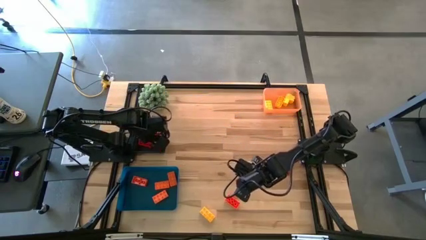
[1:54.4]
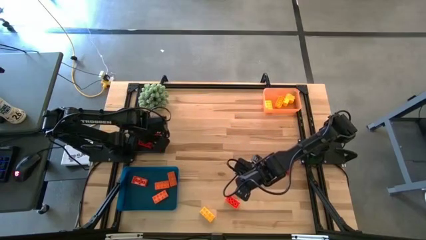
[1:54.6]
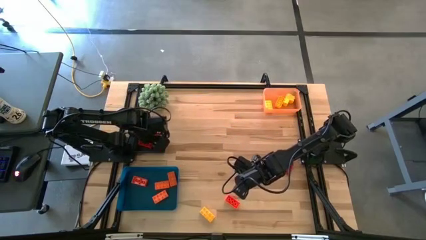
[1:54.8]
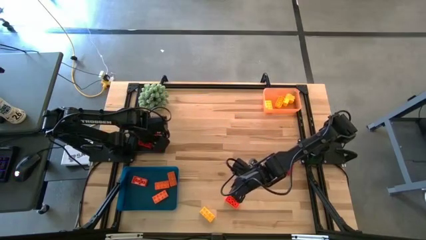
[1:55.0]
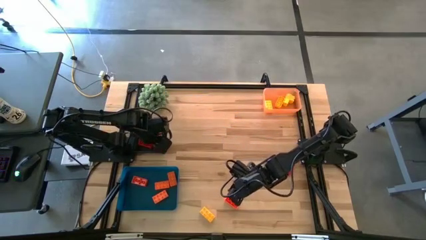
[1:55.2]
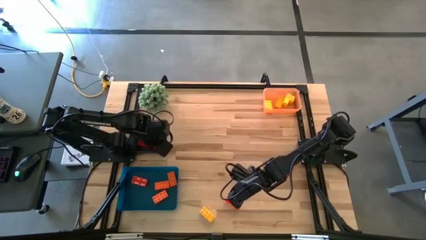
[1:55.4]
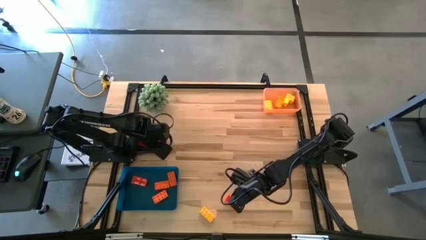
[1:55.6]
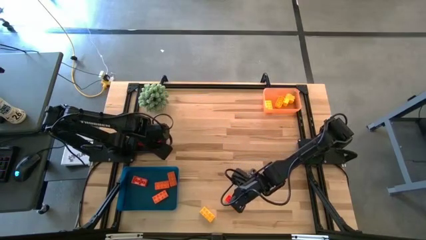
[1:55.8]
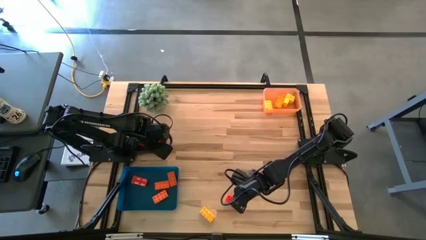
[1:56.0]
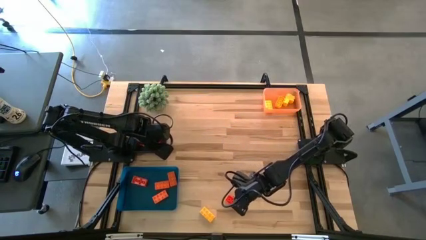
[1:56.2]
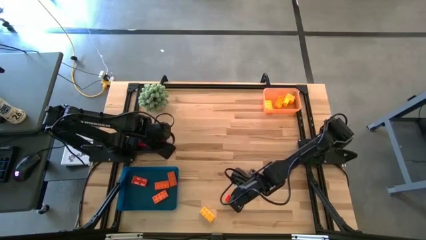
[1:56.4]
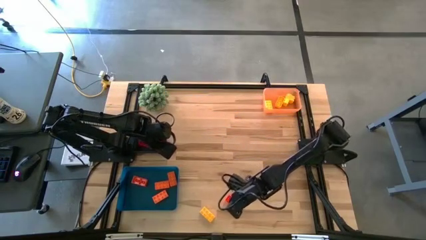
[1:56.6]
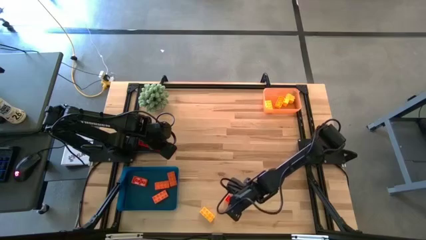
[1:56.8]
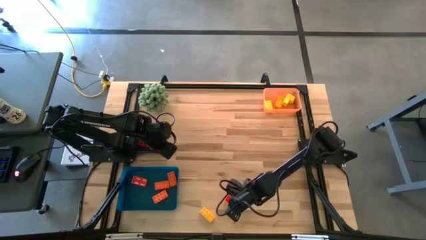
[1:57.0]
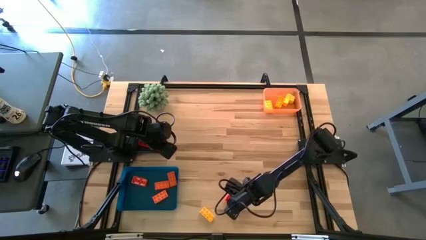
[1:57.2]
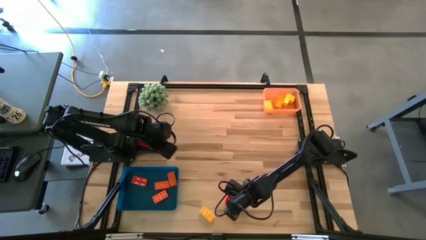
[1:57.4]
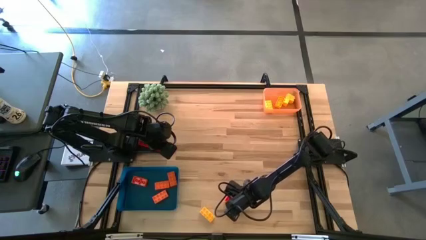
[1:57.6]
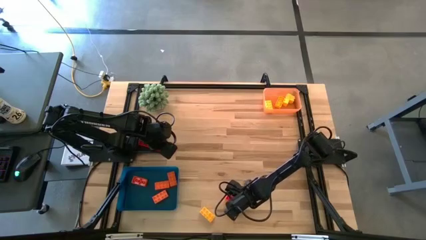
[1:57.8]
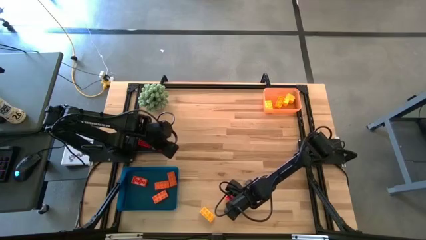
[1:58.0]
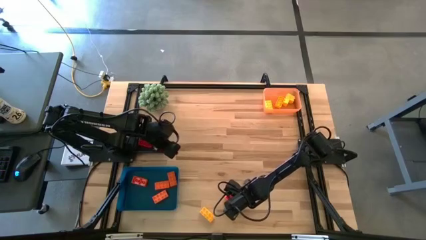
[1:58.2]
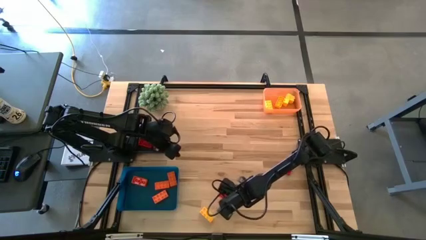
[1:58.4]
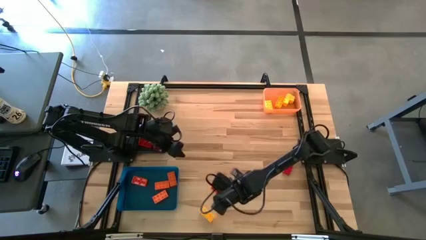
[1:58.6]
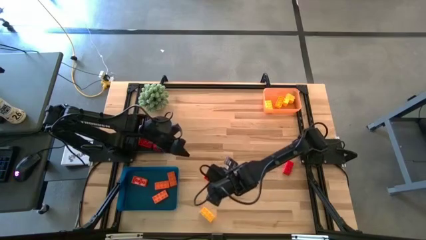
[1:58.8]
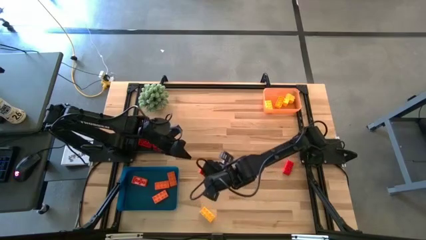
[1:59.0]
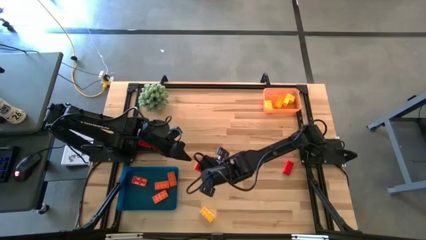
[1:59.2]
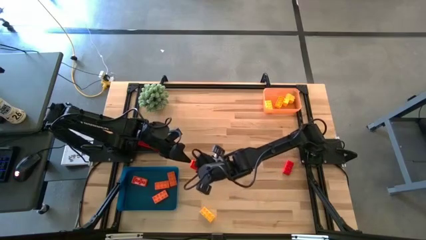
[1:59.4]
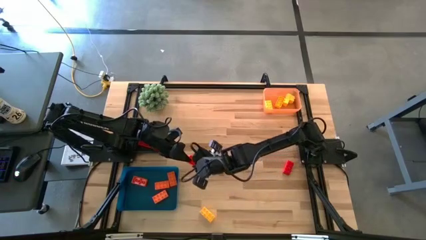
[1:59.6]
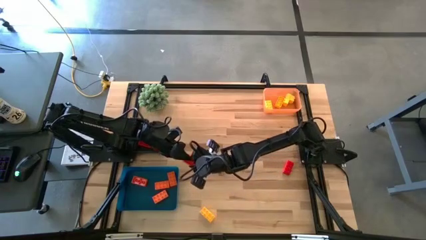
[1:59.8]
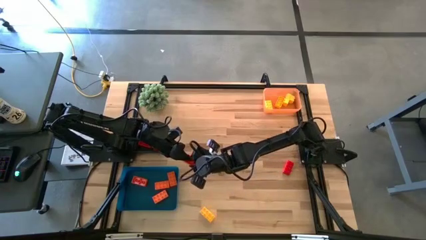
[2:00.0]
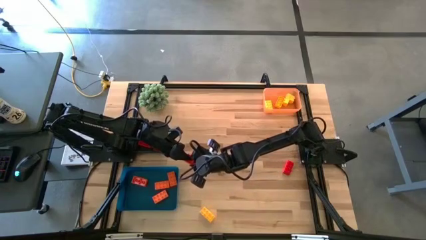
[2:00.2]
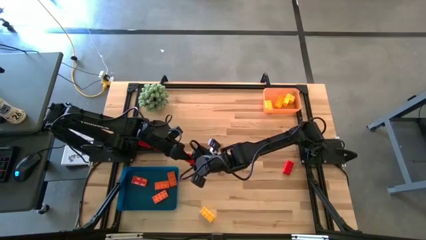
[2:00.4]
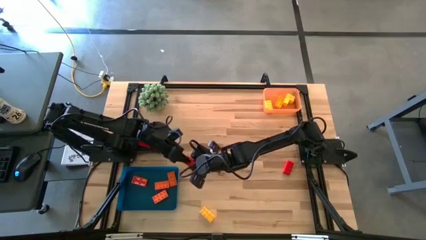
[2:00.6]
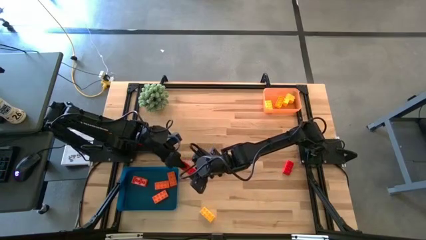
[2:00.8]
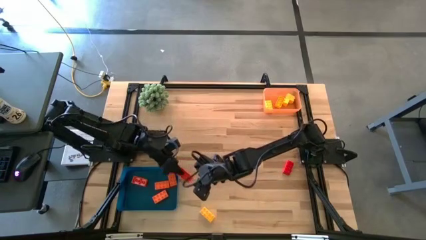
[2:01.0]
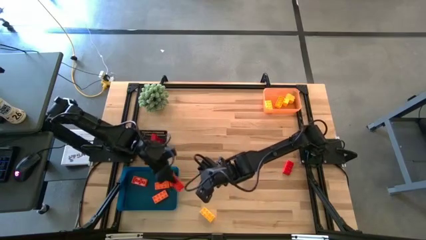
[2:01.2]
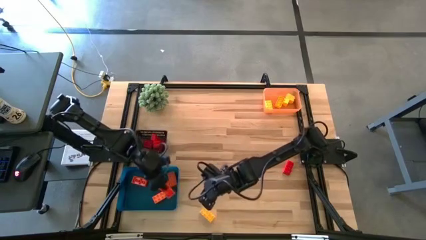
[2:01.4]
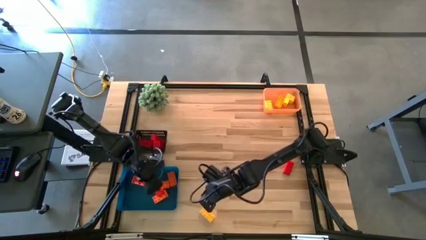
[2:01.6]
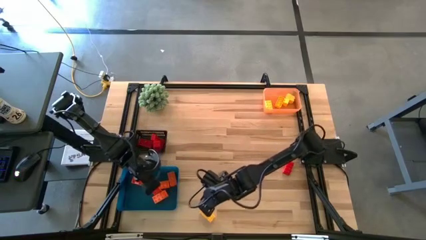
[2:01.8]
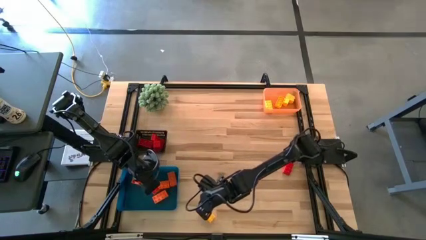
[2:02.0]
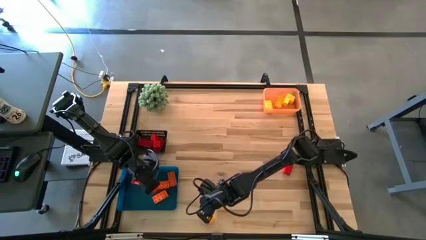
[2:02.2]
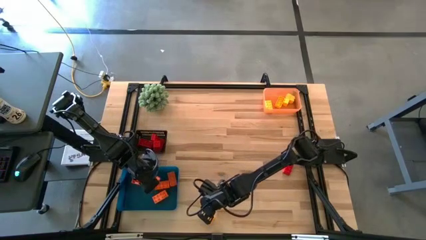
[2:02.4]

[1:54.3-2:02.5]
Task: Sort & place blocks by color
Put the orange game piece into the blue bin

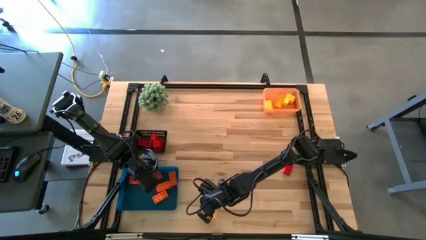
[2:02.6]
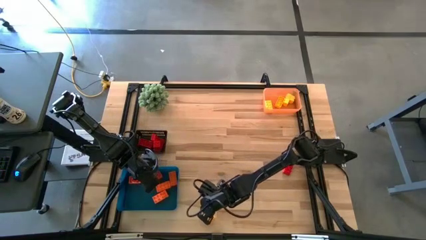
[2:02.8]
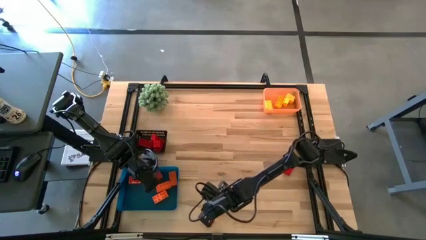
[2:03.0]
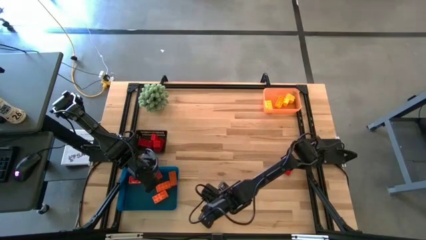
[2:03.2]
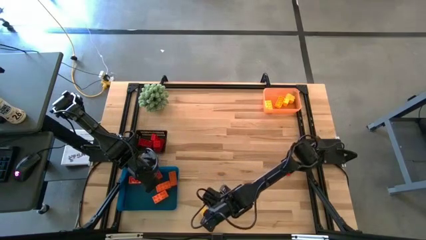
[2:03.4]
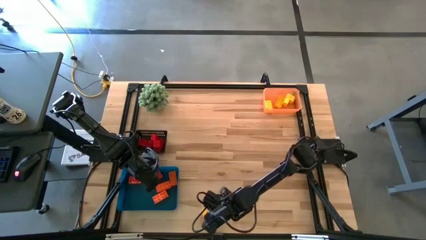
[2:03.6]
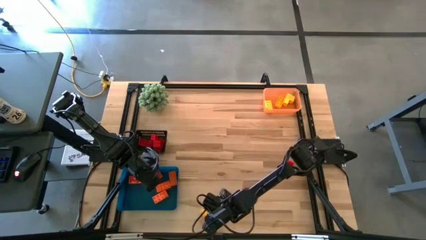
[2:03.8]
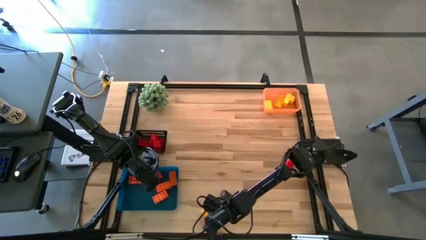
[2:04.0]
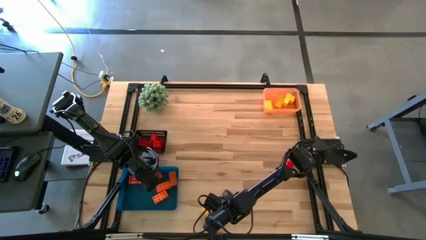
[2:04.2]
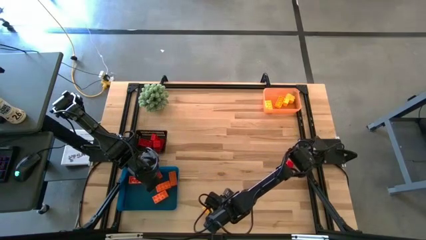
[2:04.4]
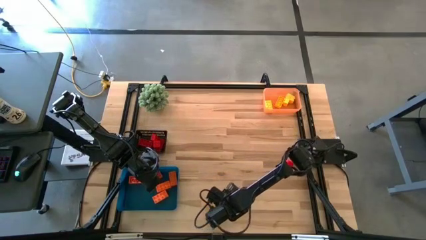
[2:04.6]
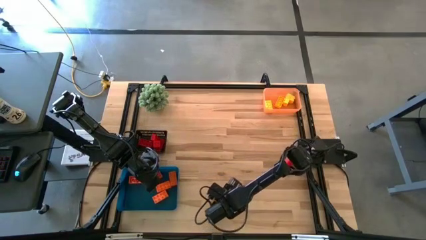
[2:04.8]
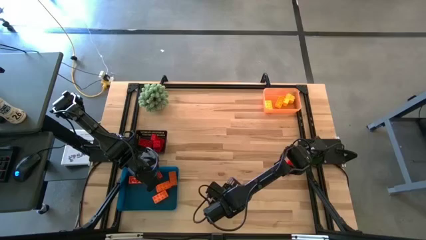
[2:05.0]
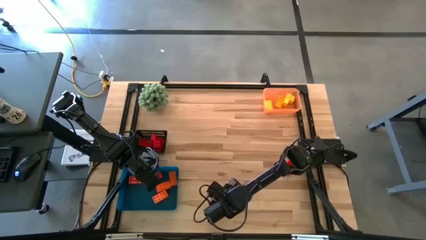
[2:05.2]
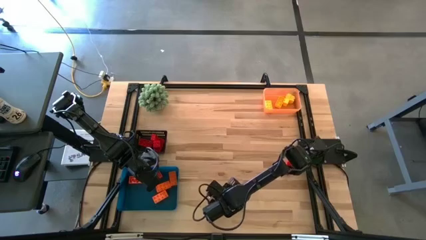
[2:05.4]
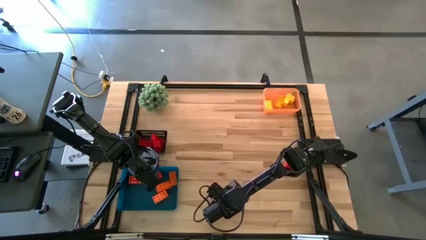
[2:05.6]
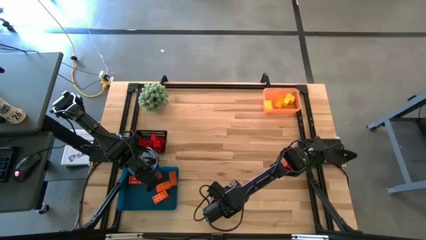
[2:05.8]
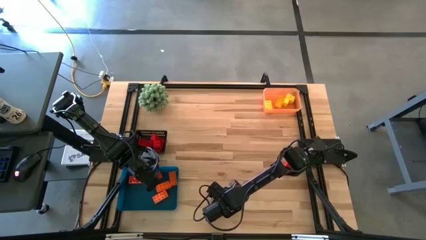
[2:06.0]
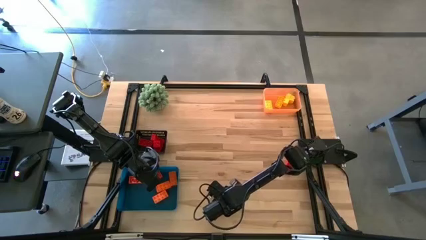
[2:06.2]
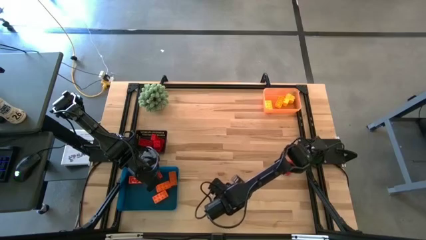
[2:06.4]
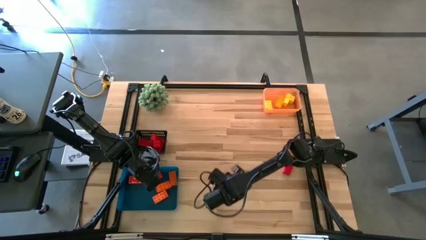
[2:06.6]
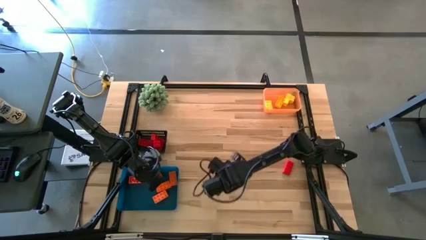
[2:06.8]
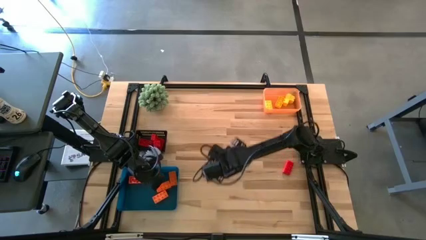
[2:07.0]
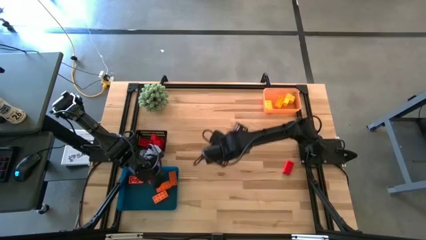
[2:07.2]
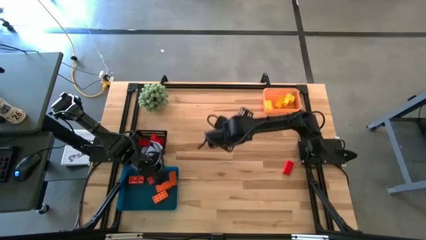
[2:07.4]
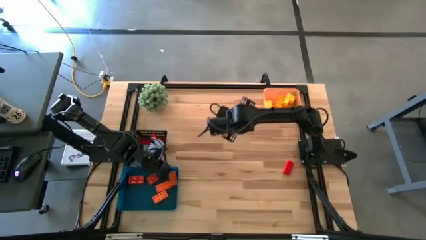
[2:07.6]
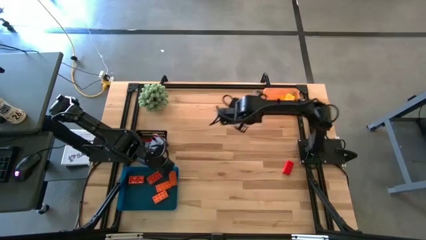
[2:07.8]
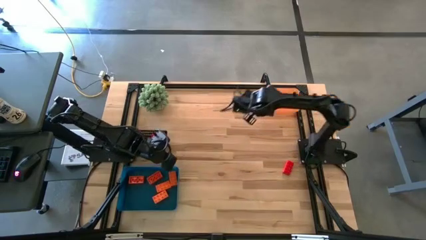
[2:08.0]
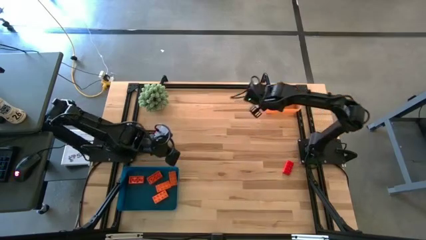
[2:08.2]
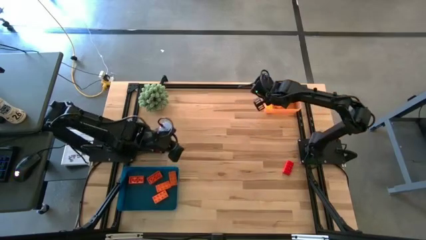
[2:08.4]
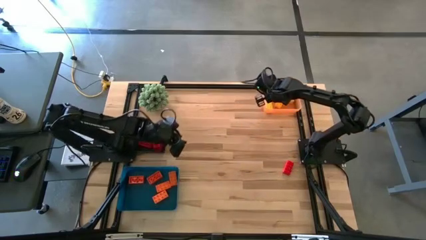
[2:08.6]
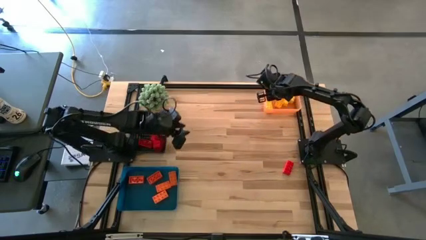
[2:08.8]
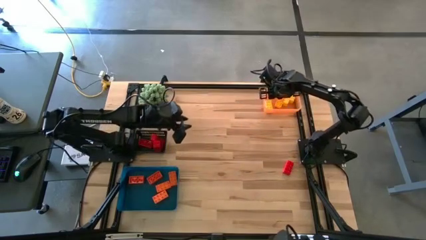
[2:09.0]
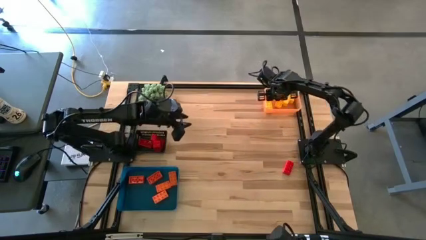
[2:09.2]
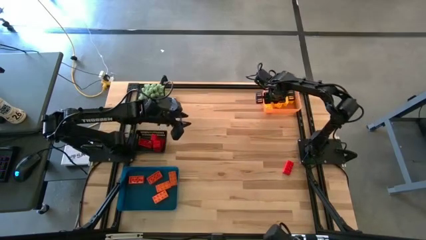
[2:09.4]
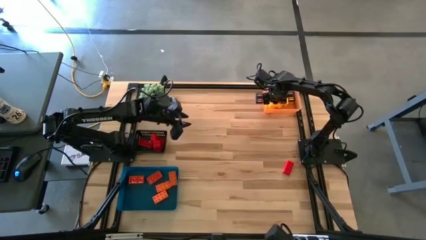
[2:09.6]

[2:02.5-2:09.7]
Put the yellow game piece into the orange bin
